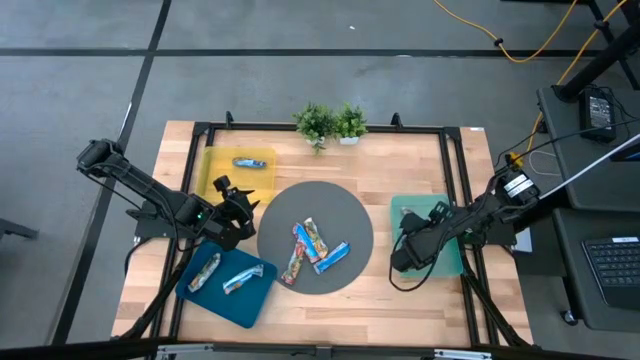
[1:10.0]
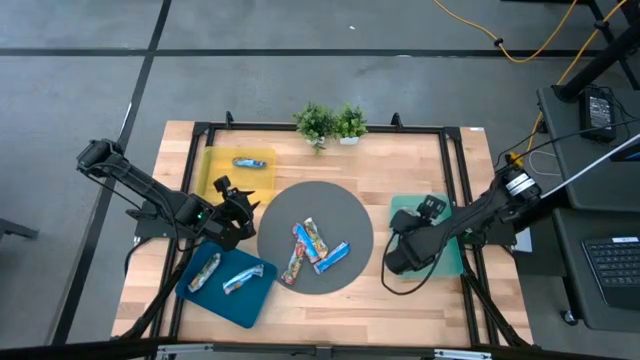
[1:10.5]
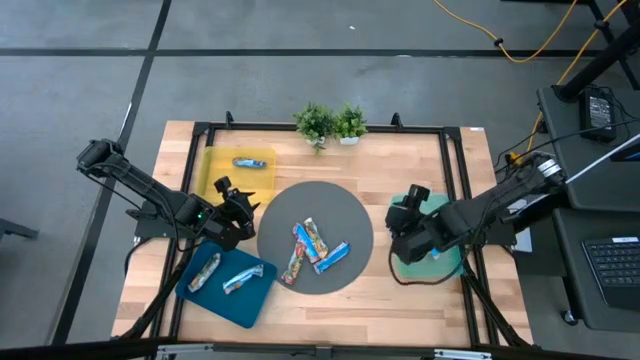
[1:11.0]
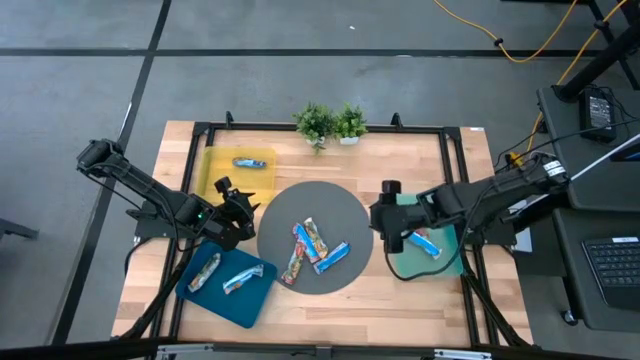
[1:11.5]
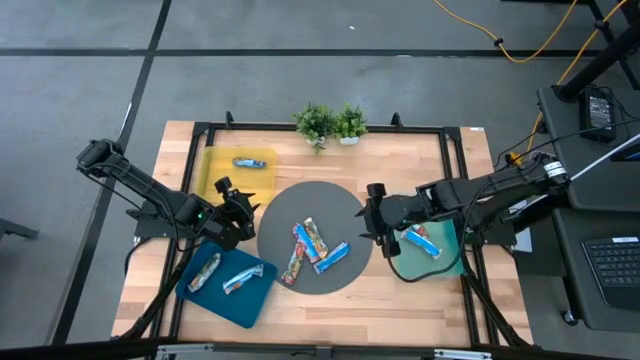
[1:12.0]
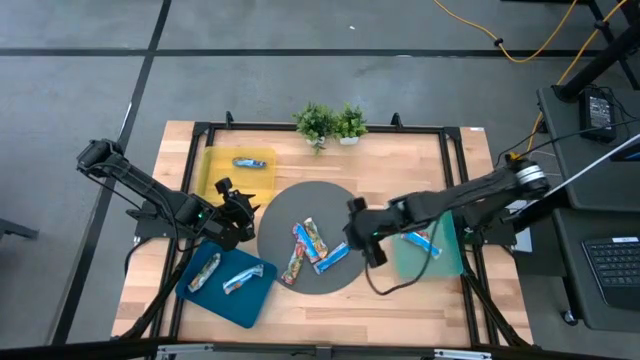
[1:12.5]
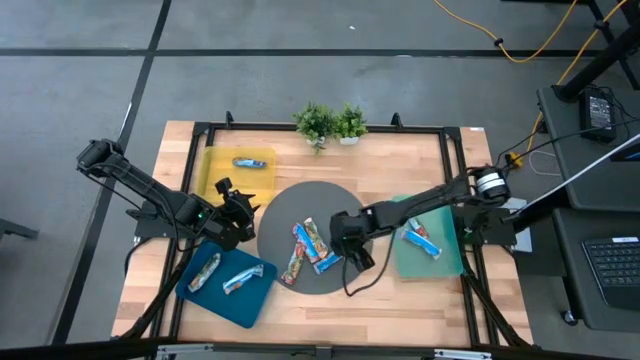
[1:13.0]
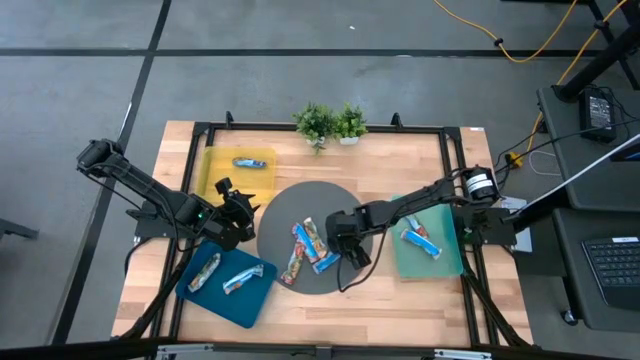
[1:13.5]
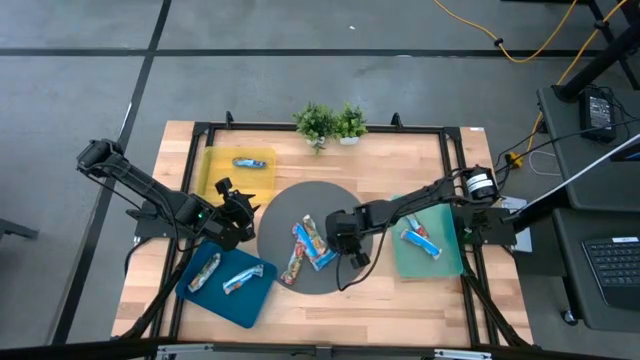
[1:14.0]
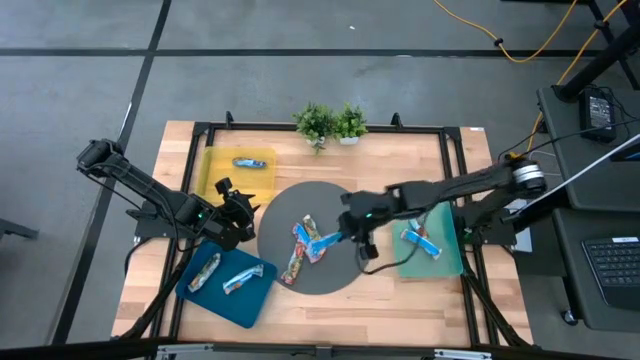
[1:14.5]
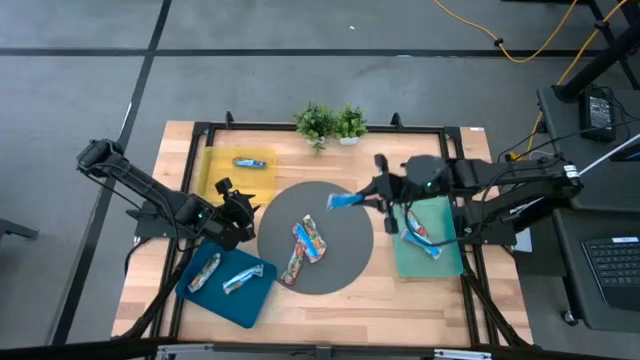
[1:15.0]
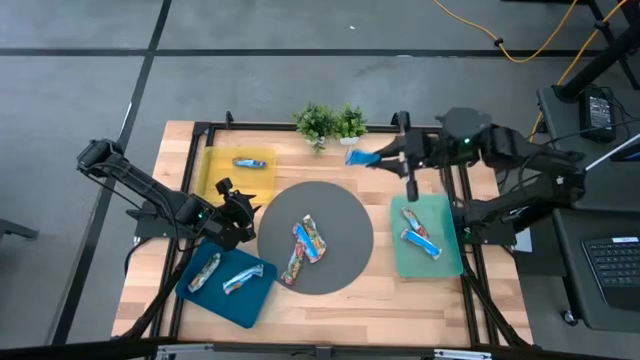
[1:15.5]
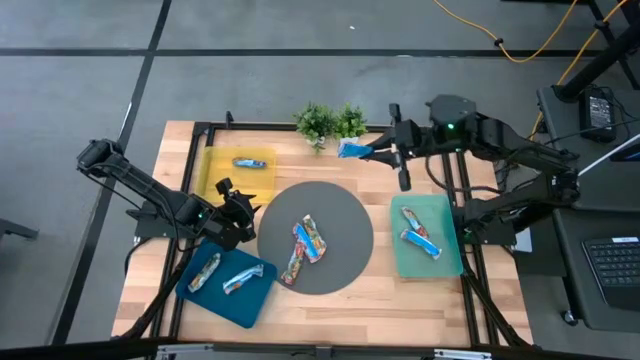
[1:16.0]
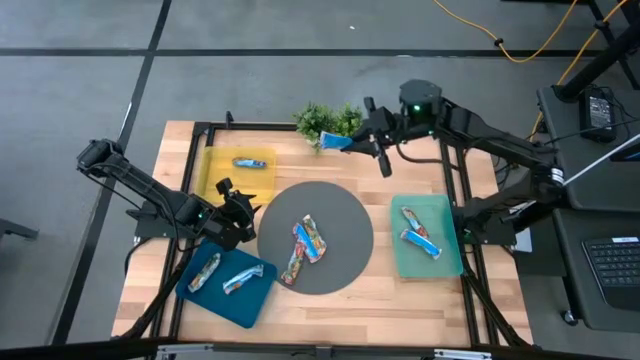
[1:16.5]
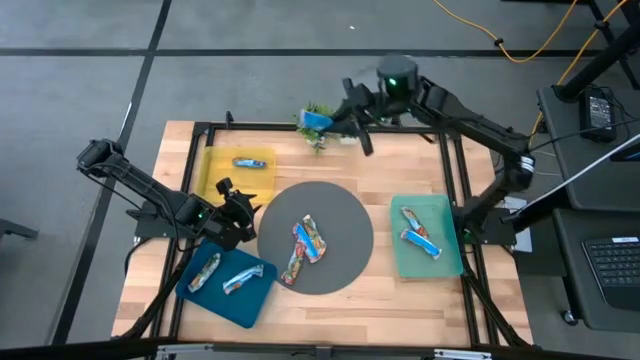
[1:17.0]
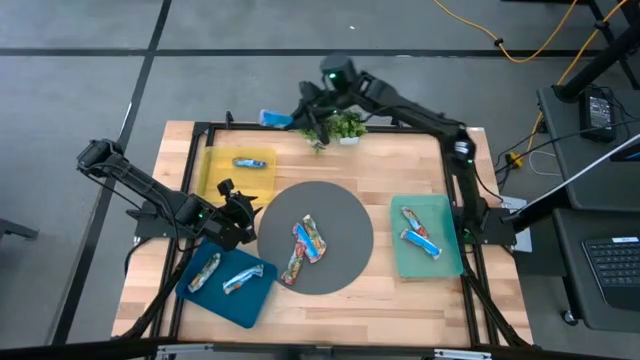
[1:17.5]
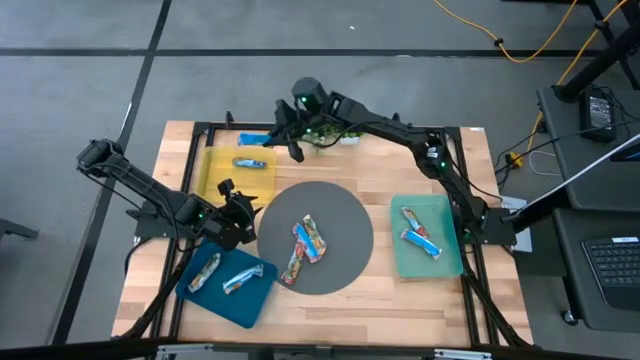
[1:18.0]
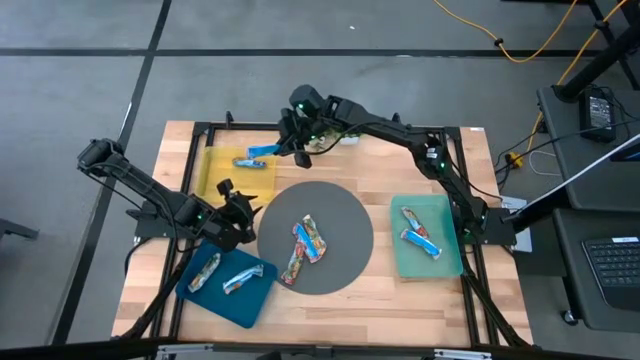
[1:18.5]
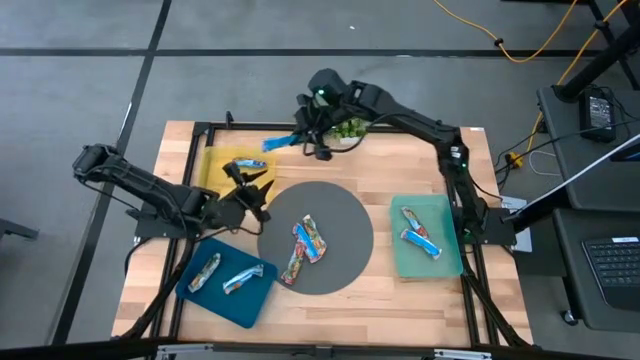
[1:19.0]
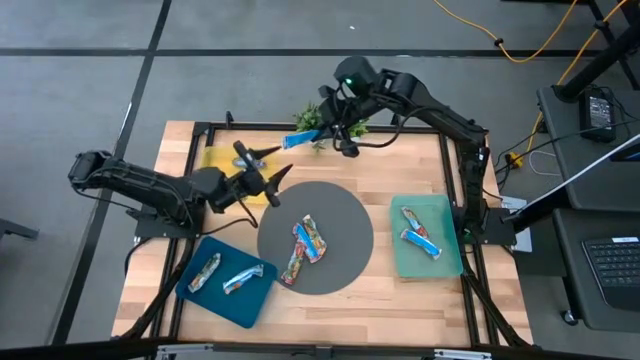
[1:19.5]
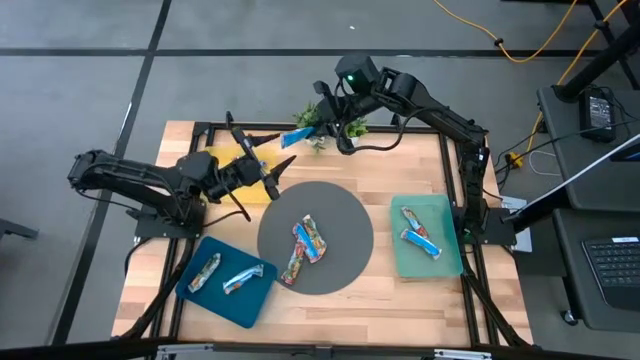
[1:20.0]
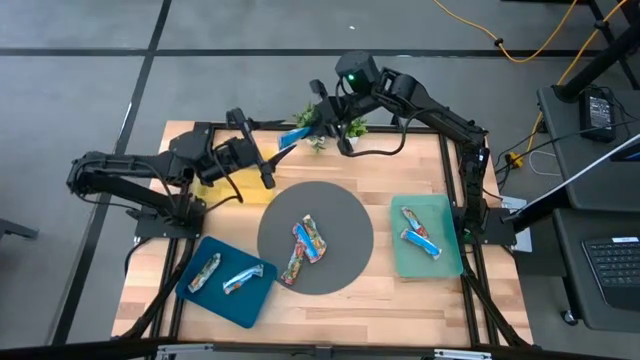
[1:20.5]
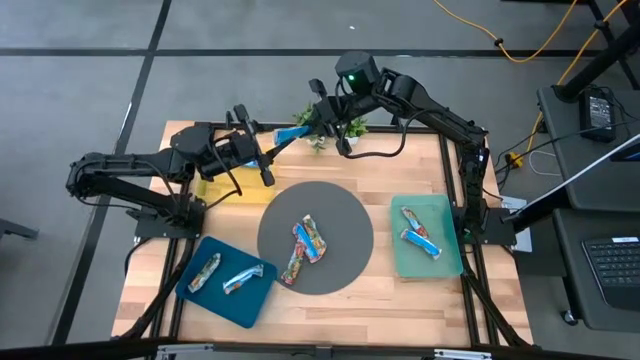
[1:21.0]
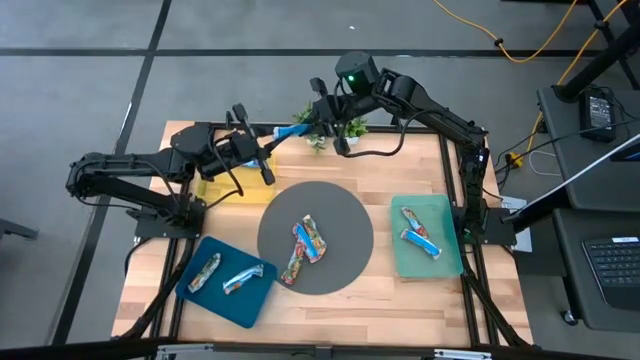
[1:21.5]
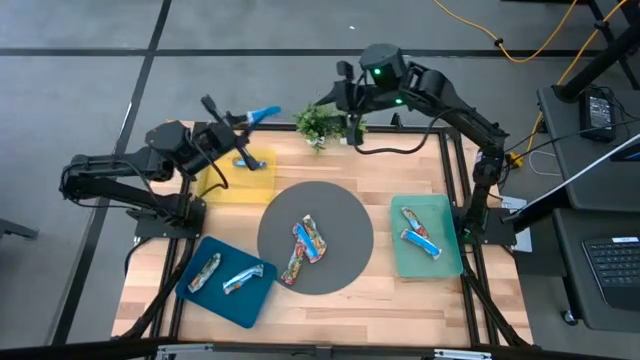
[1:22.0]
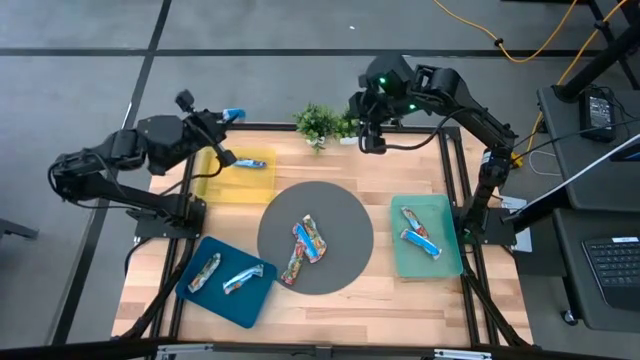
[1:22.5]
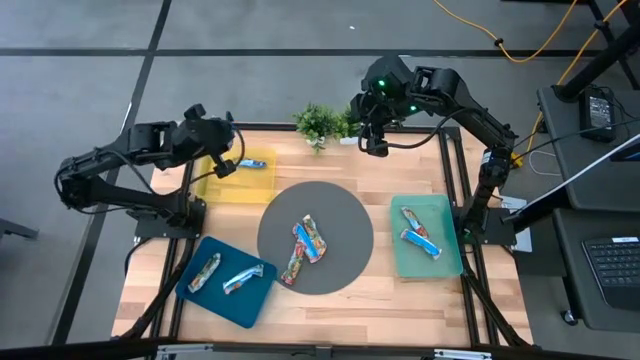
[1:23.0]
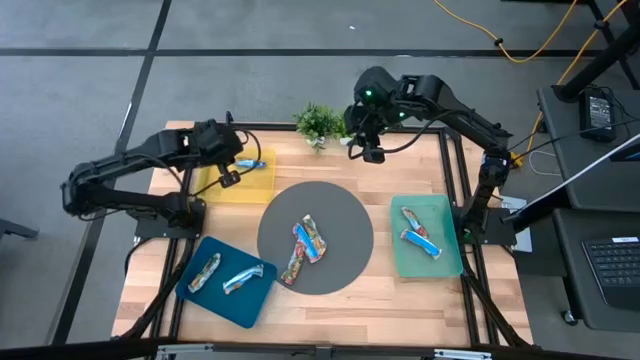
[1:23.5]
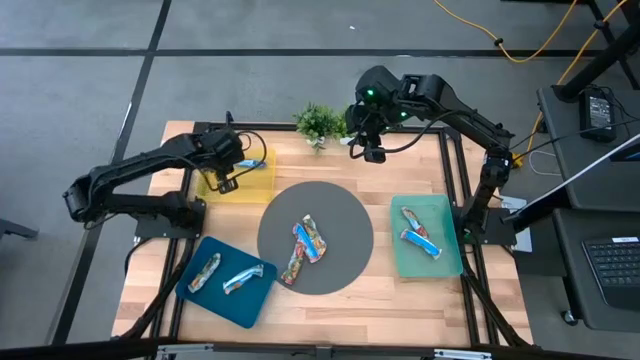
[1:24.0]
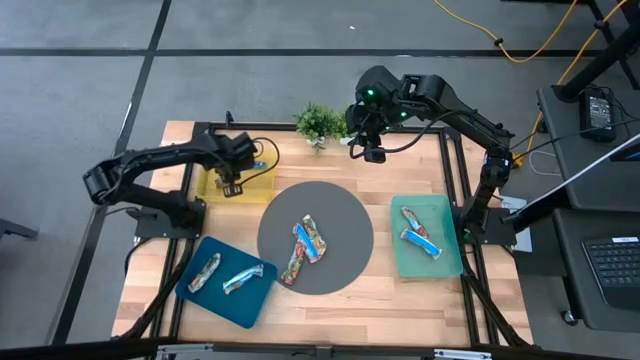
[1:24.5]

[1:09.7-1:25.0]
Task: Pick and place Granola Bars by type
Put the blue granola bar into the yellow bin

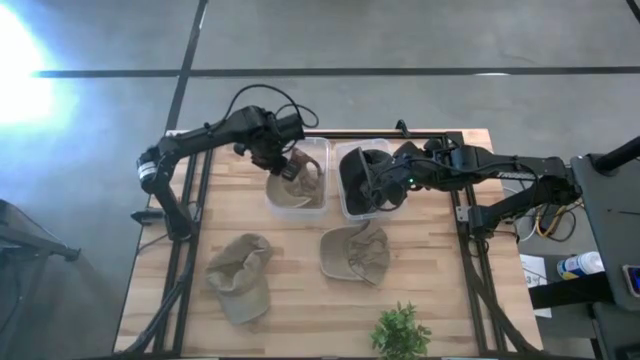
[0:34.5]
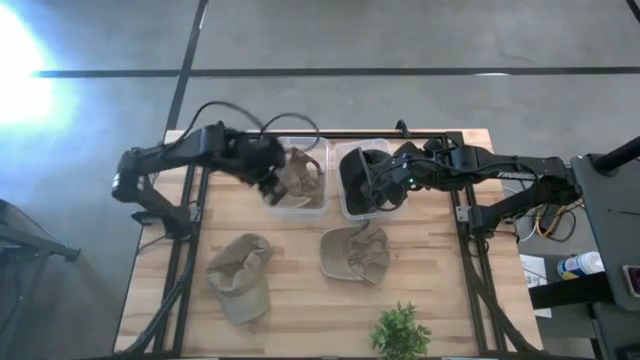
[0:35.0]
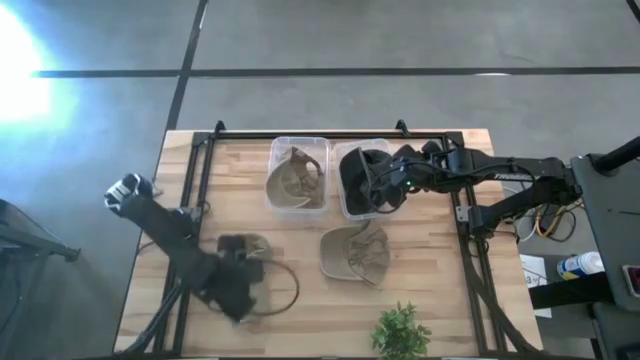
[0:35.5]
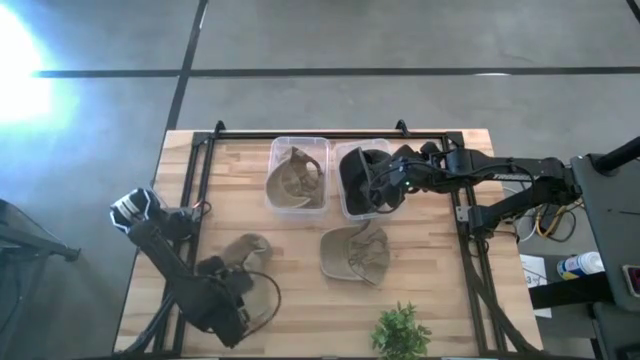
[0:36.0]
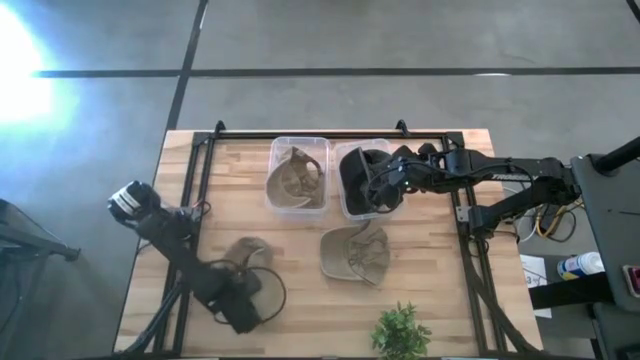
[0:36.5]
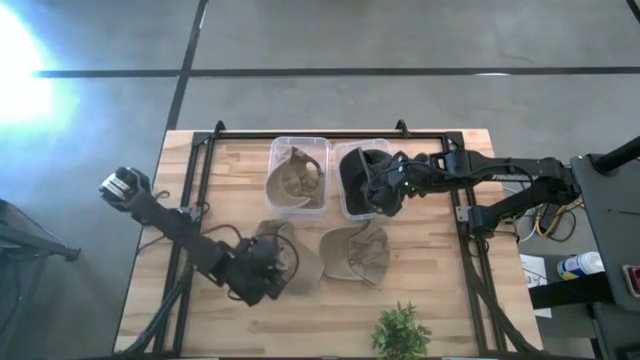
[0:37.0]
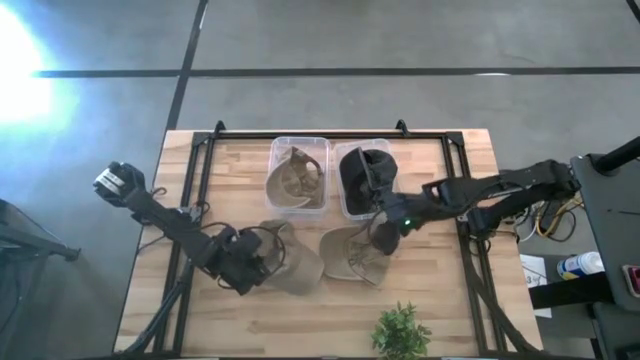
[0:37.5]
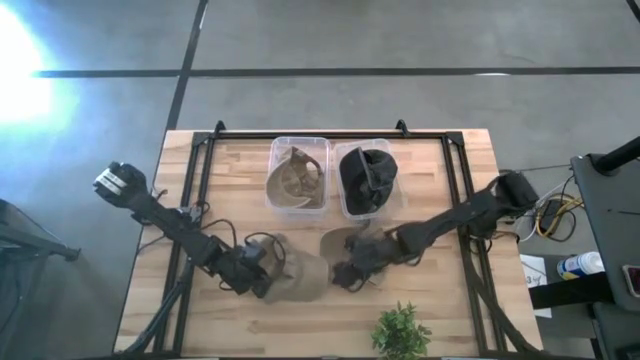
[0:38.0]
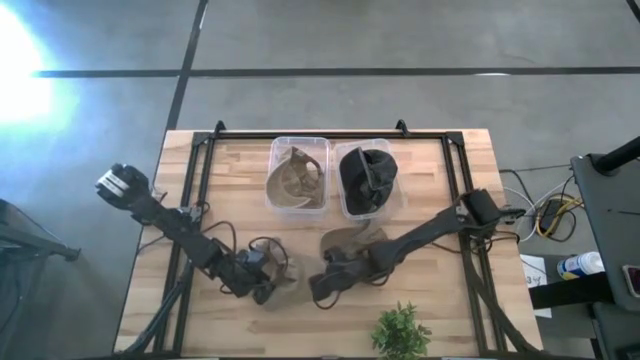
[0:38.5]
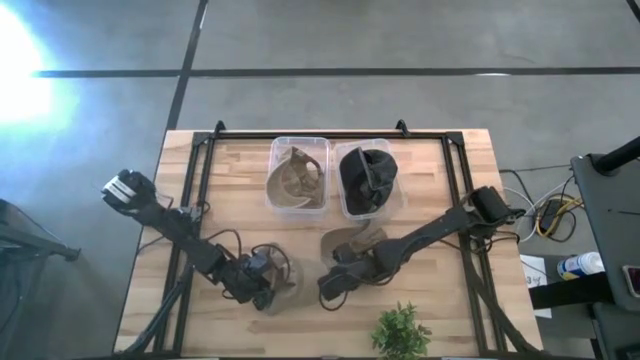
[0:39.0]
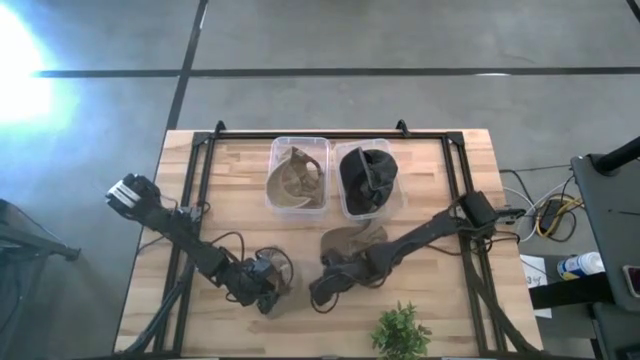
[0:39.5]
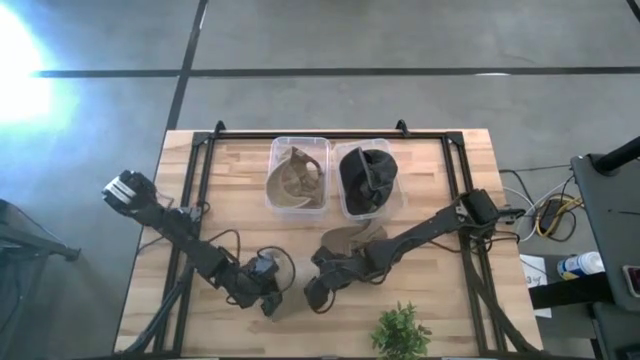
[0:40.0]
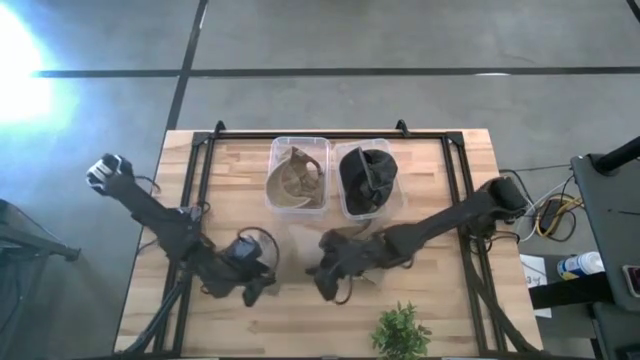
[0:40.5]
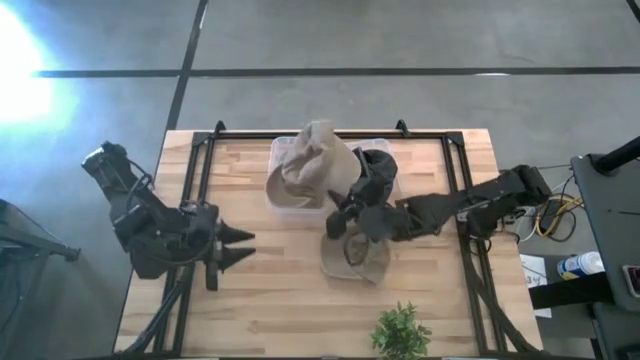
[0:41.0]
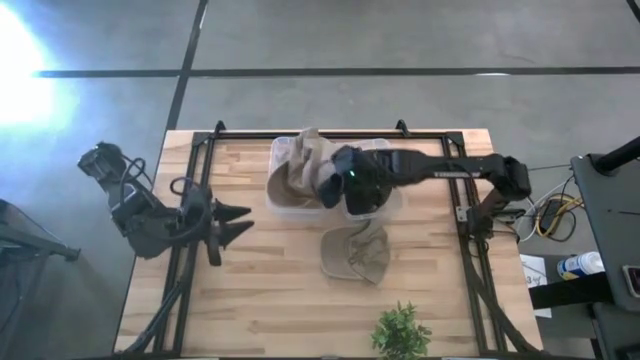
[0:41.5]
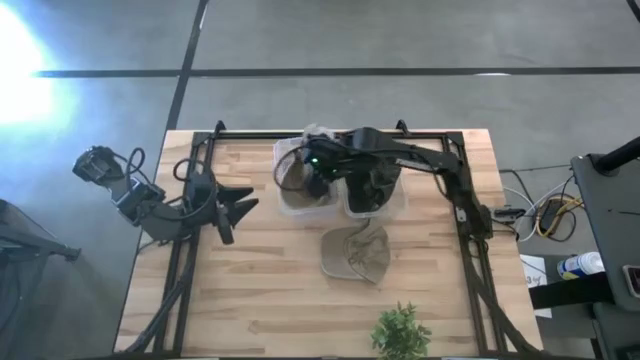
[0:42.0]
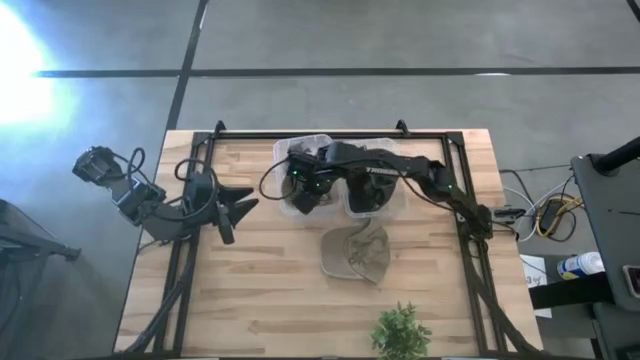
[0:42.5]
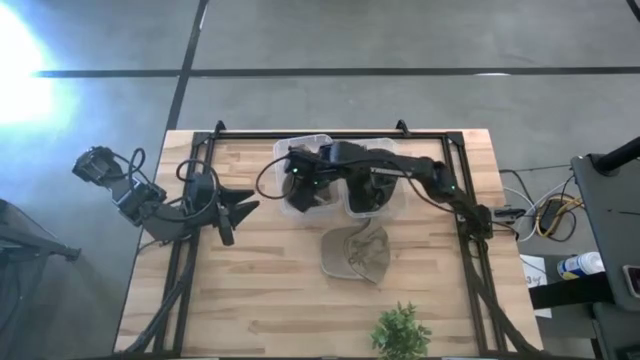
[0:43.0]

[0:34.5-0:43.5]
Task: Pick & Place hat
Put the left brown cap into the left transparent bin
